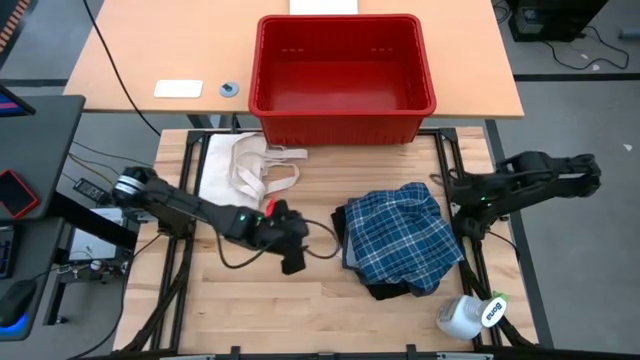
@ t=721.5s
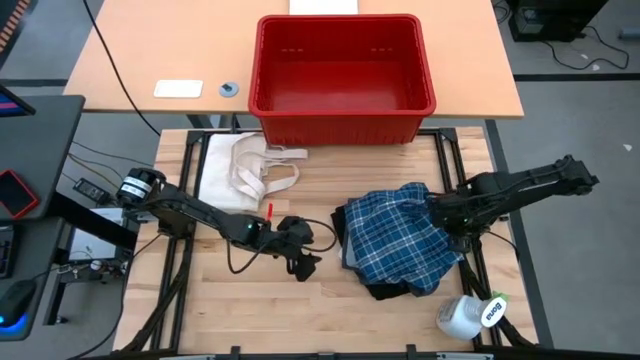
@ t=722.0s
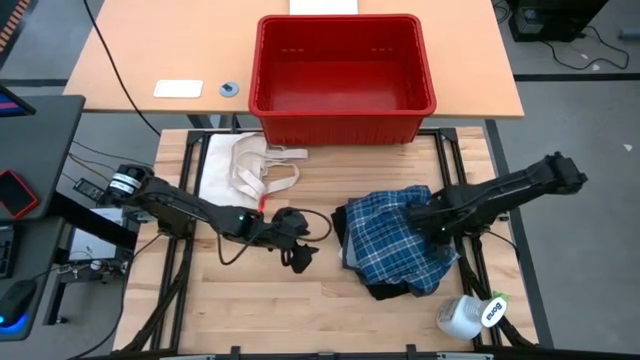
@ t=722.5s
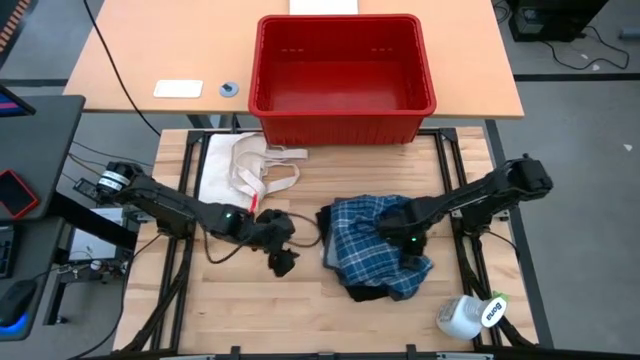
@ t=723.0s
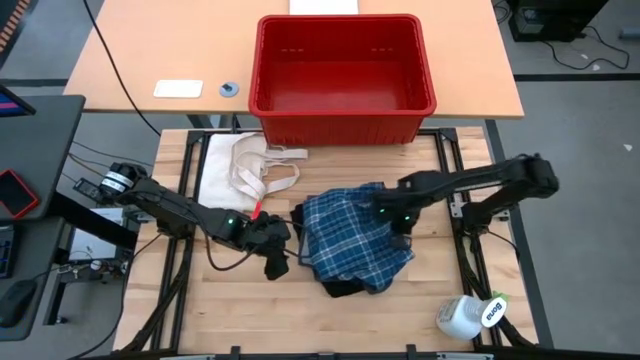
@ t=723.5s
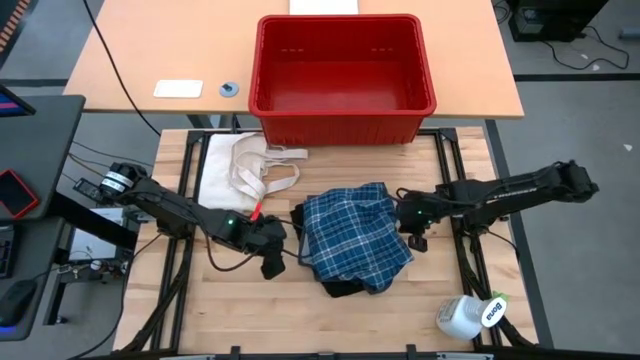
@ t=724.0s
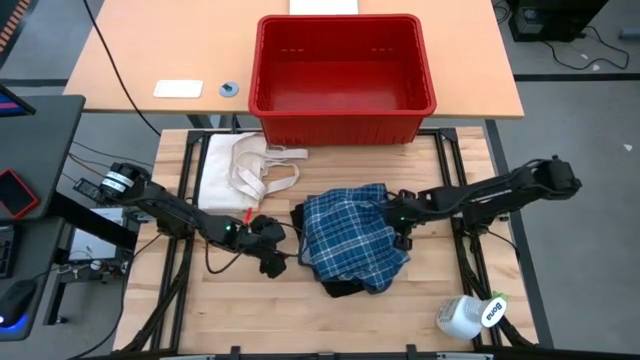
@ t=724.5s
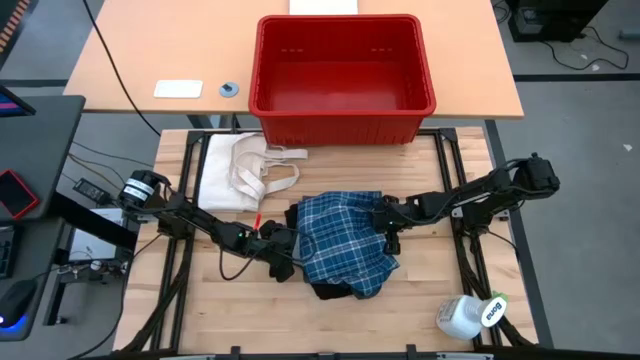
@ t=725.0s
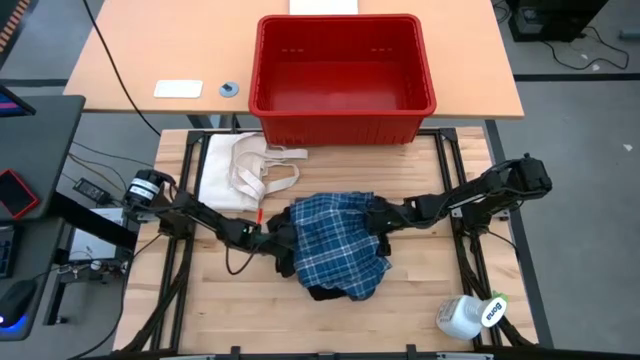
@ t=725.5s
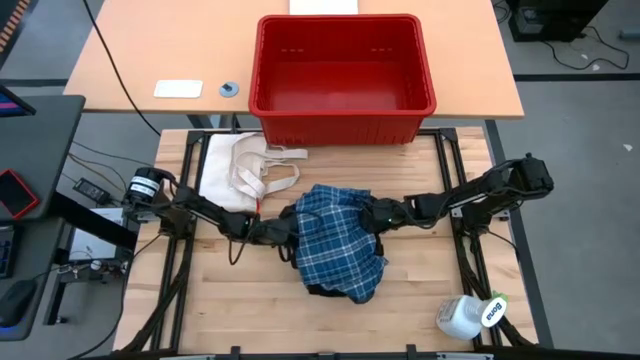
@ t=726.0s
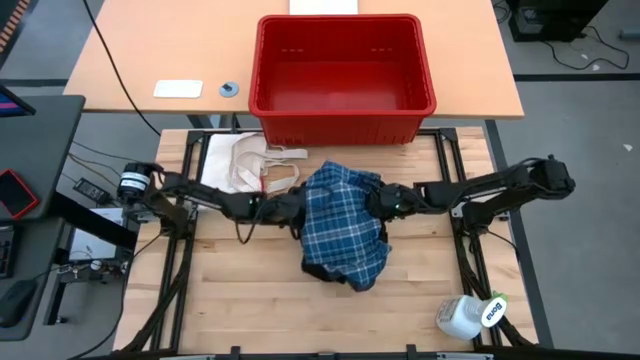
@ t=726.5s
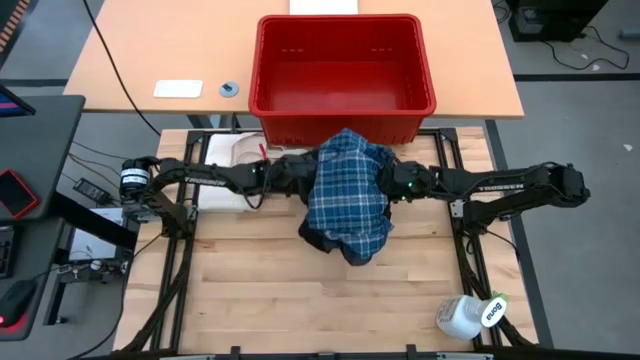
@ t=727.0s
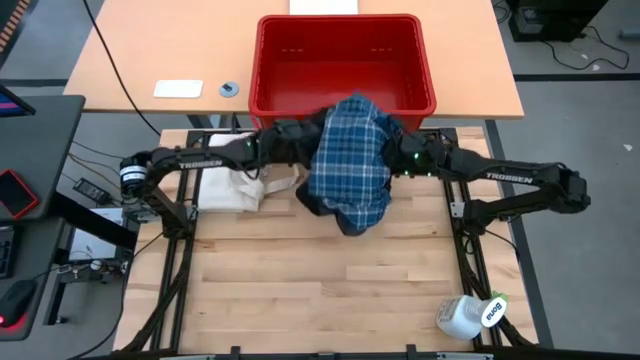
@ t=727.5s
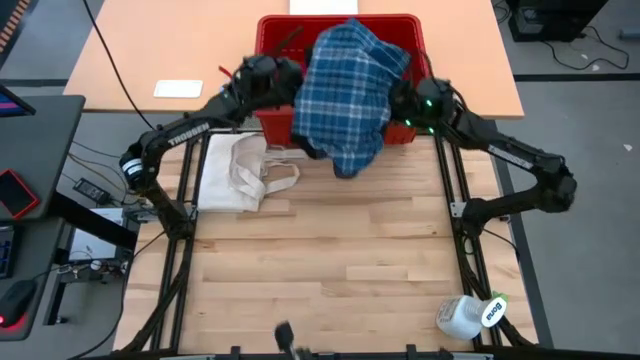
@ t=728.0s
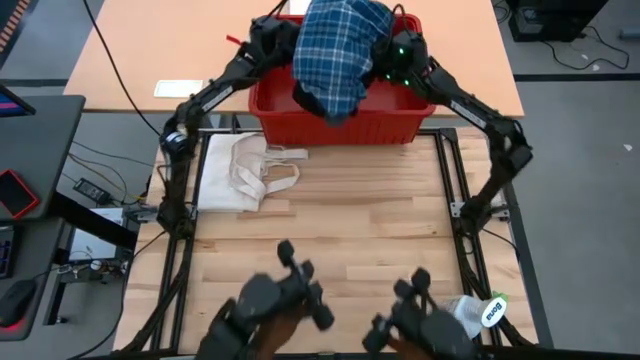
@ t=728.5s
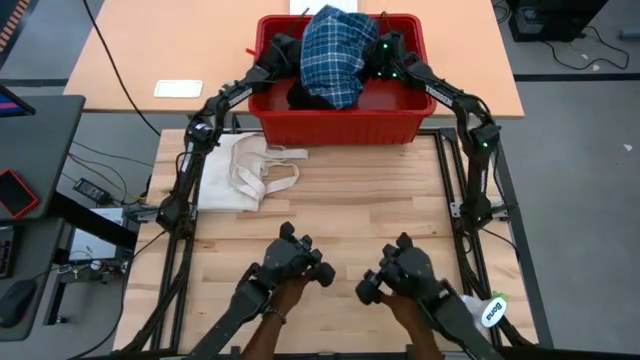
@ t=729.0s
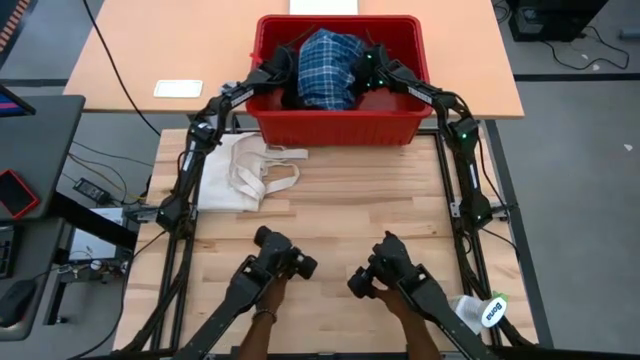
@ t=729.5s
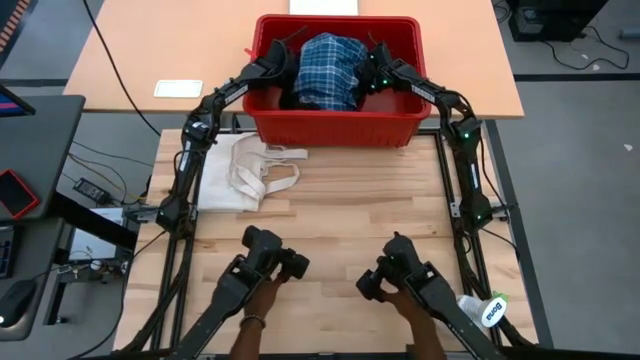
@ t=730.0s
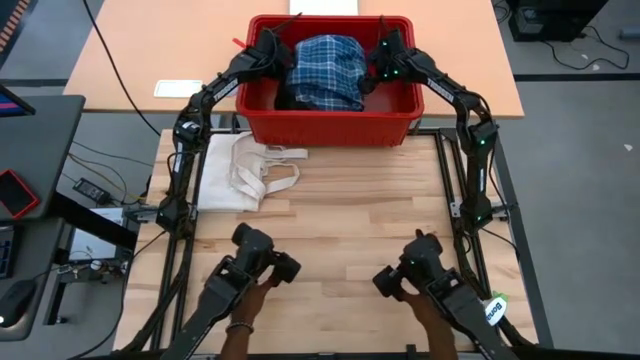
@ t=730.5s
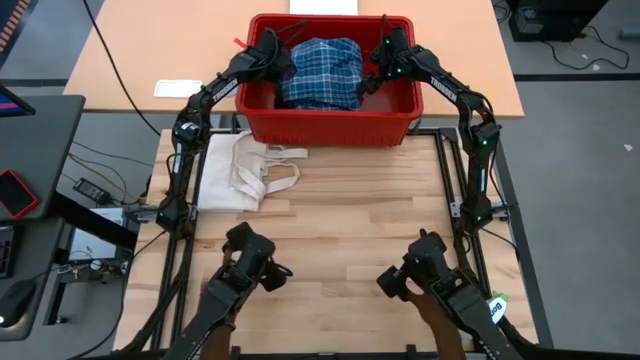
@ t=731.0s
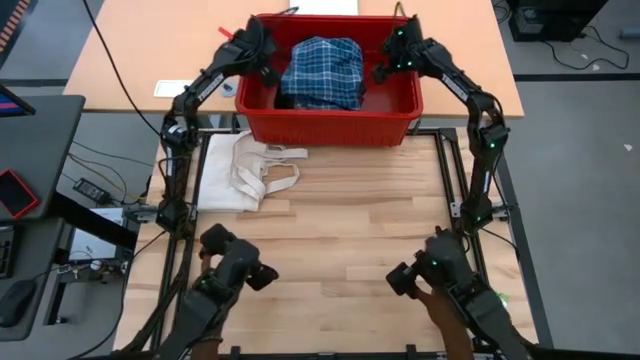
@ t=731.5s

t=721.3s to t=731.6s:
Task: Fold Laundry from Bin
Put the stack of folded clothes into the red bin

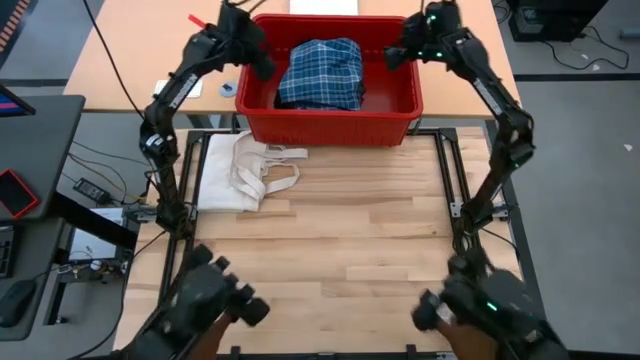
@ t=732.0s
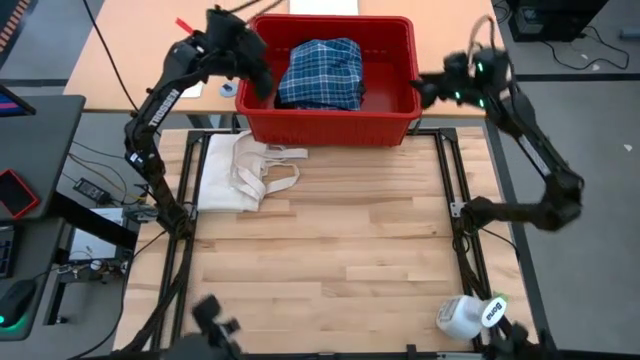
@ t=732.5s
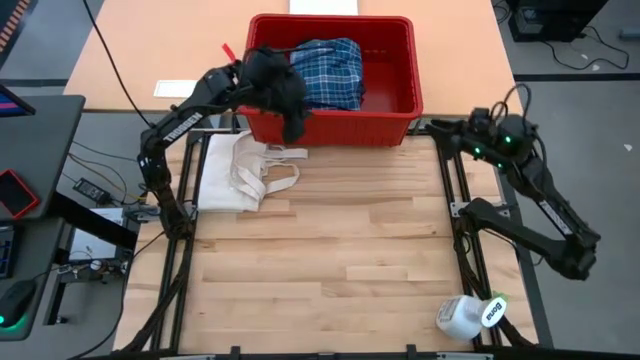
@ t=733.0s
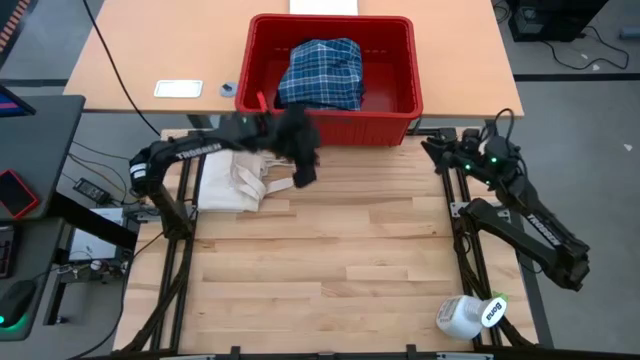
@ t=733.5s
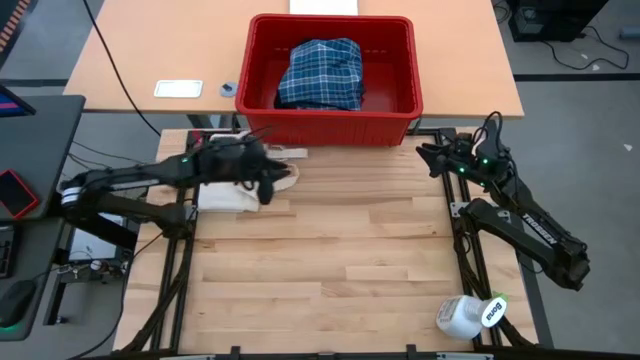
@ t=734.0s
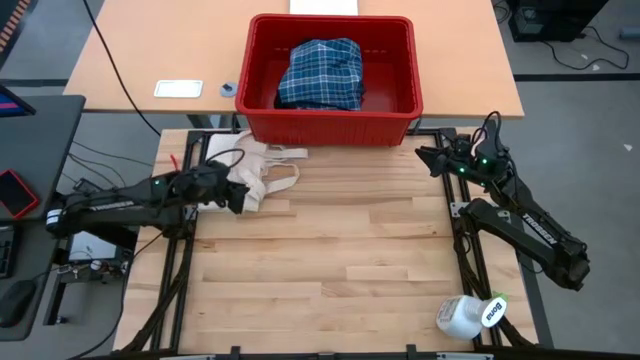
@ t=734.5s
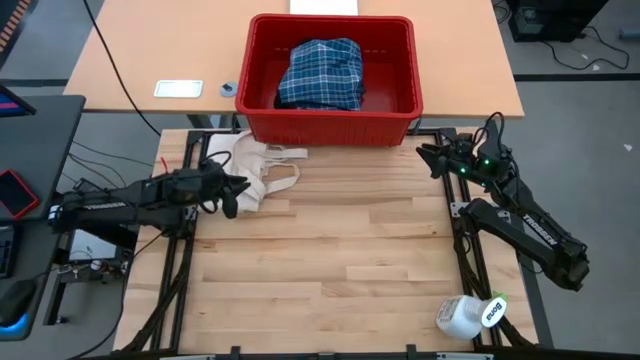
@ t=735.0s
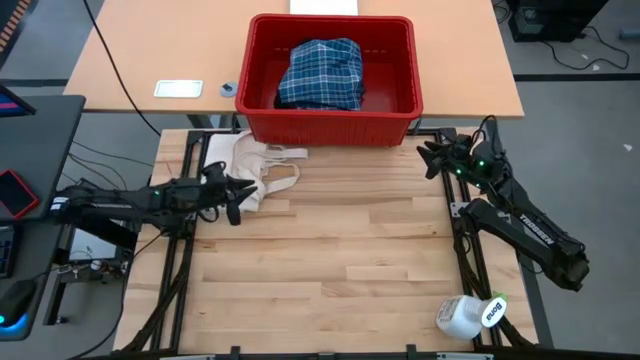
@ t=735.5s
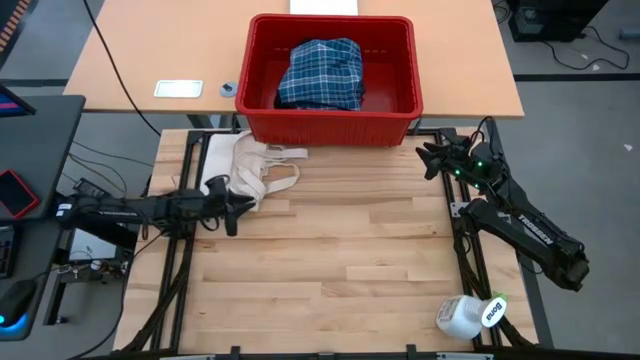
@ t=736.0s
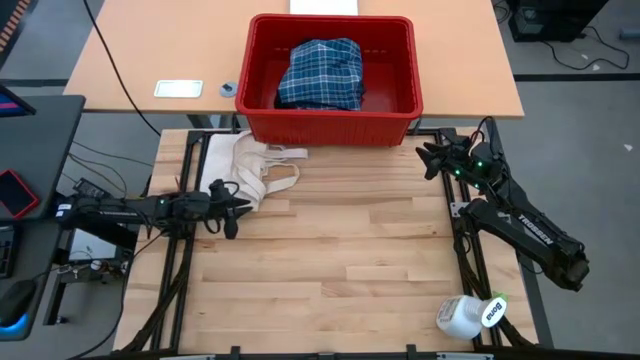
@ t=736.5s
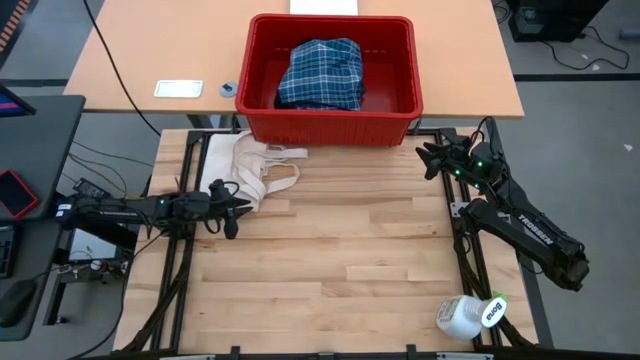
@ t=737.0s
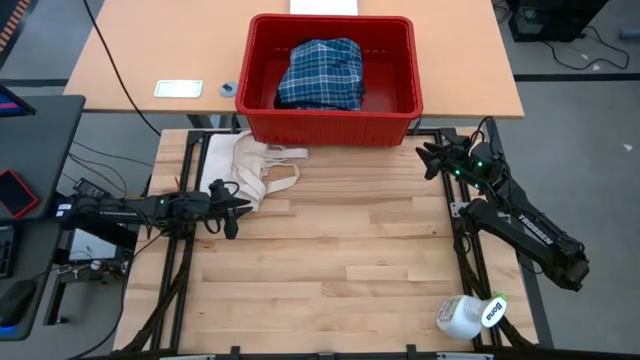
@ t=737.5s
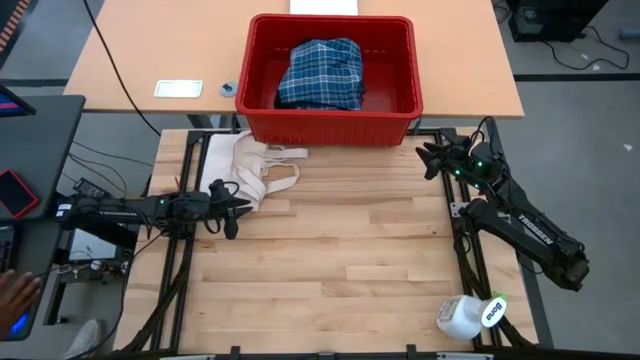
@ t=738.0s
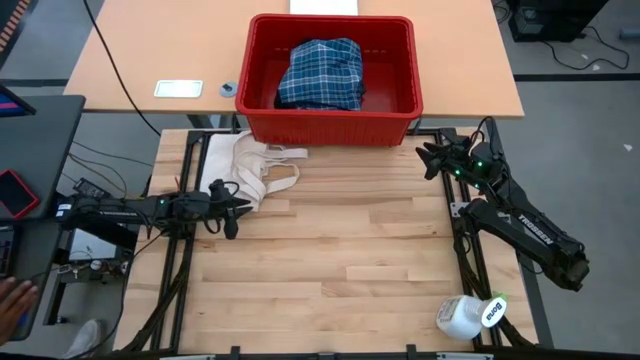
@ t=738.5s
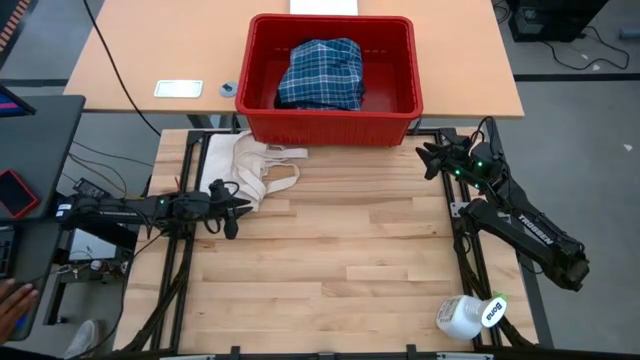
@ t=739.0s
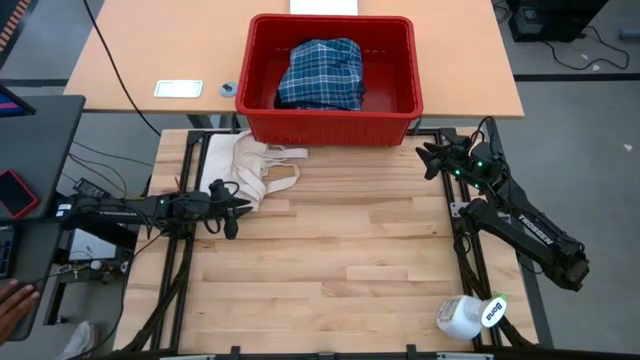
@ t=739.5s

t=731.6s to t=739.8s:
Return to Home Position

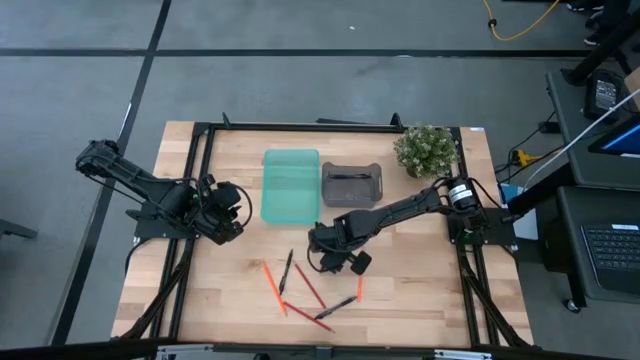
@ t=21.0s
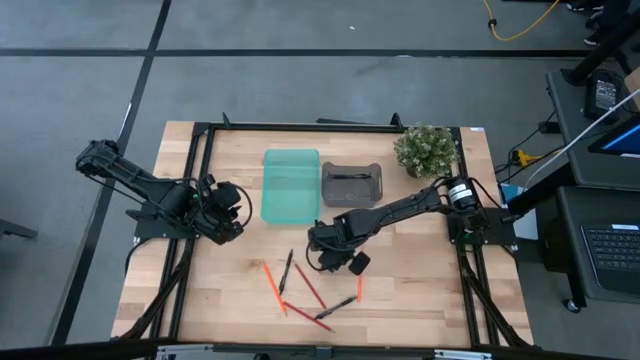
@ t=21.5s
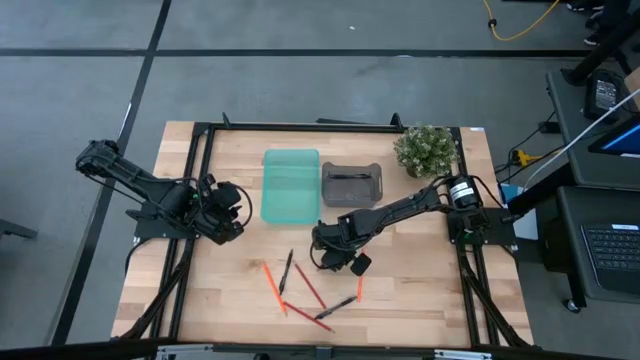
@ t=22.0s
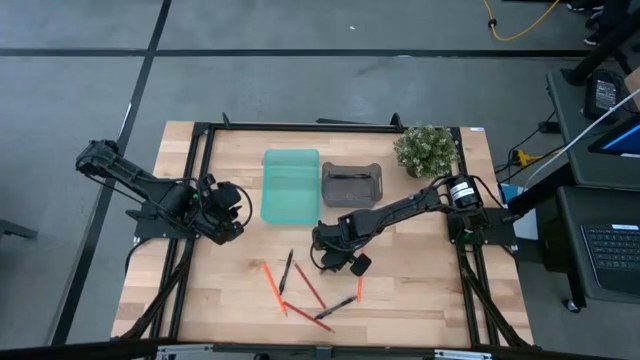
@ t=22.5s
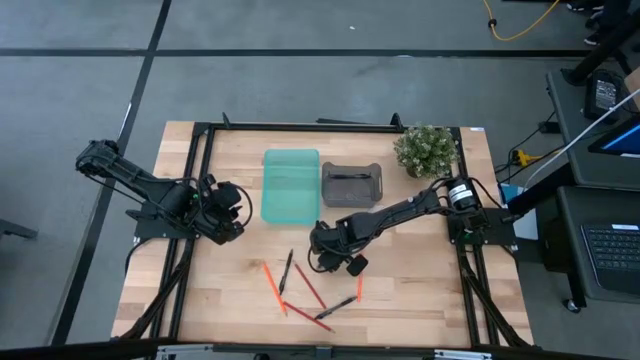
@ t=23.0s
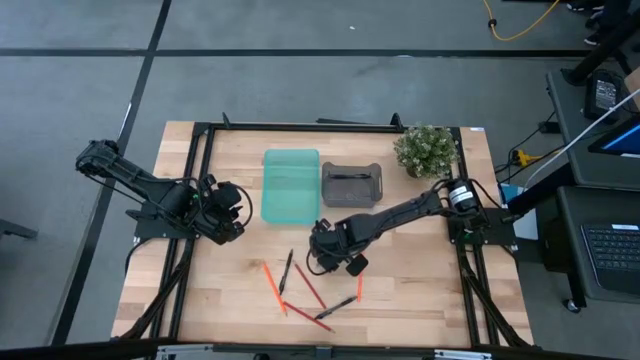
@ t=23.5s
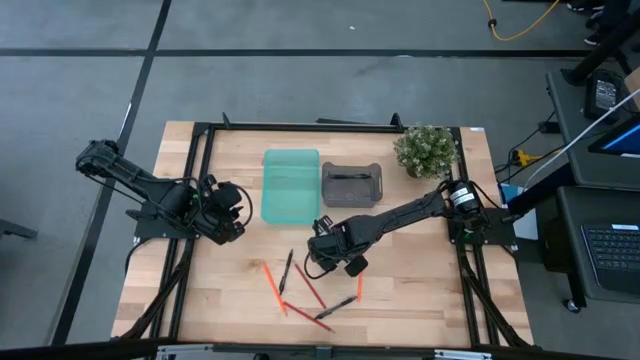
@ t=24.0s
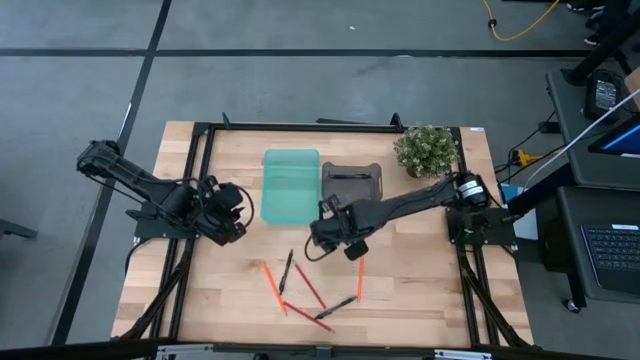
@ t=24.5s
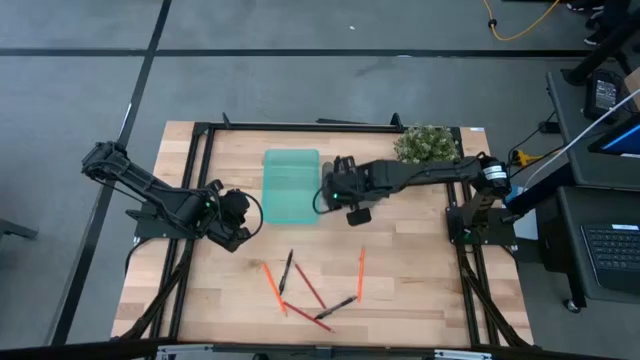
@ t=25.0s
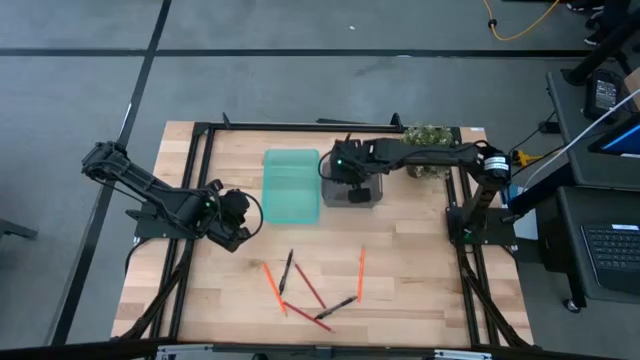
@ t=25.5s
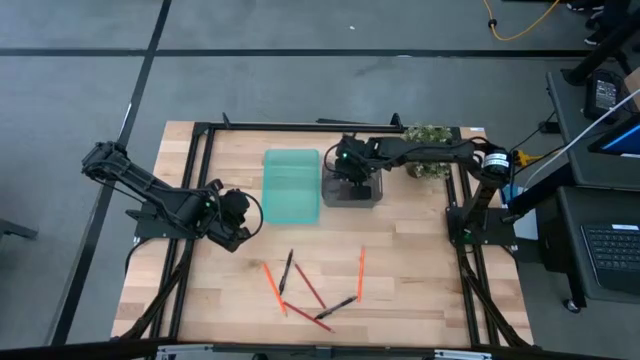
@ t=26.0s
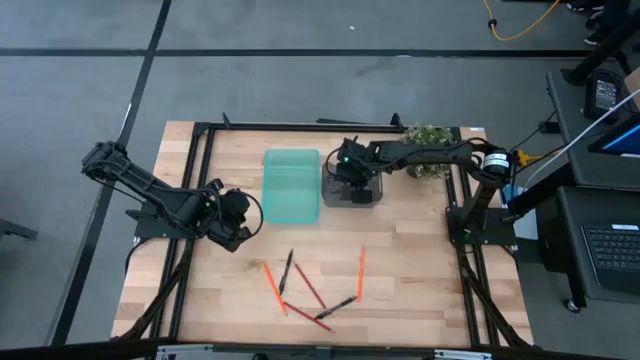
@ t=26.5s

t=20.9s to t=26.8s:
Task: Sort pens & pencils
Put the black pen into the black bin
